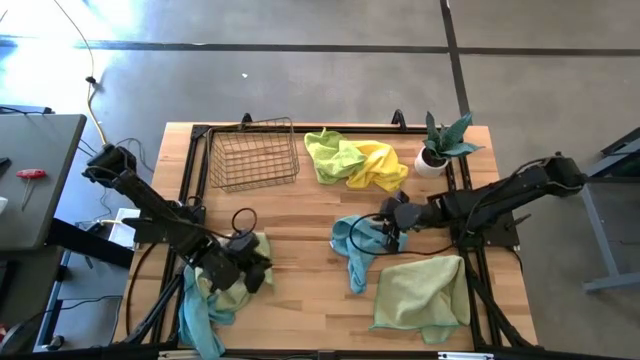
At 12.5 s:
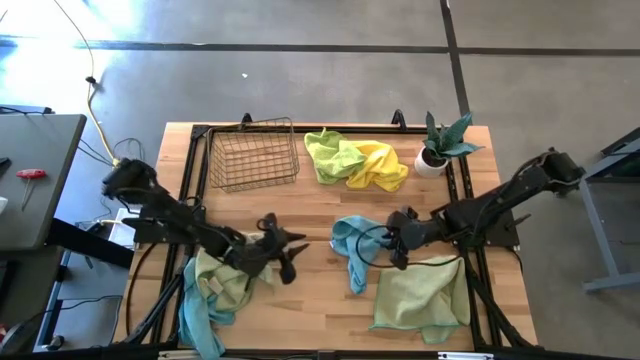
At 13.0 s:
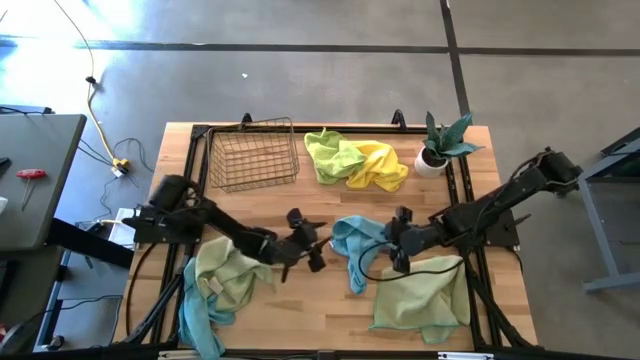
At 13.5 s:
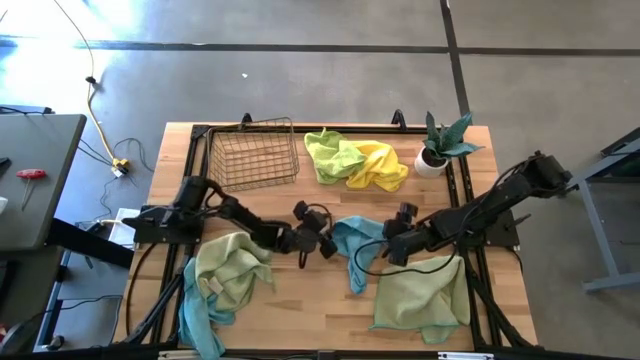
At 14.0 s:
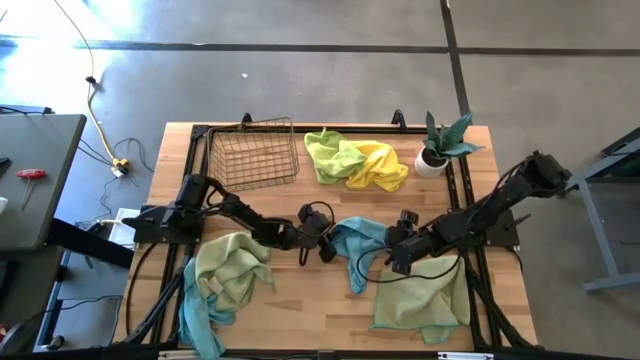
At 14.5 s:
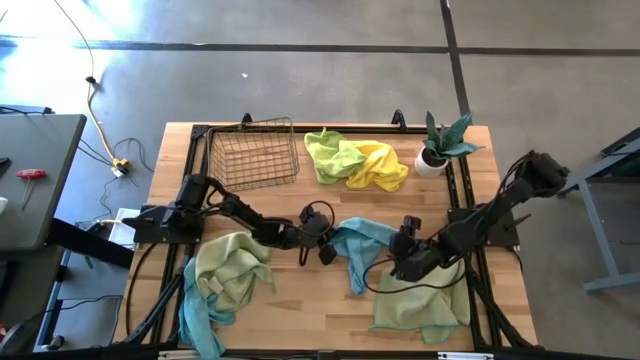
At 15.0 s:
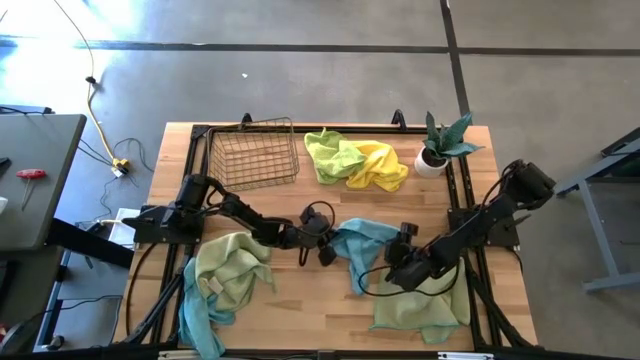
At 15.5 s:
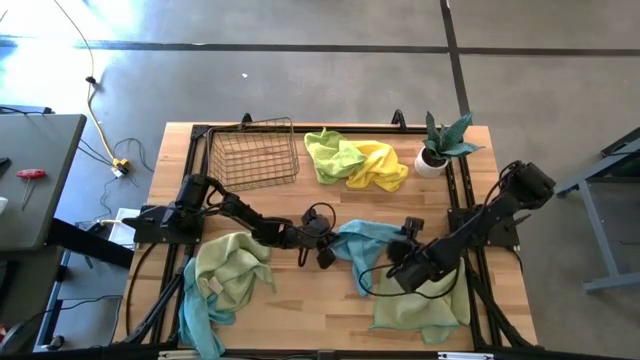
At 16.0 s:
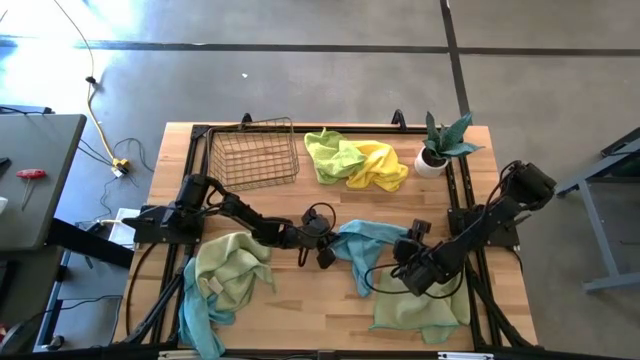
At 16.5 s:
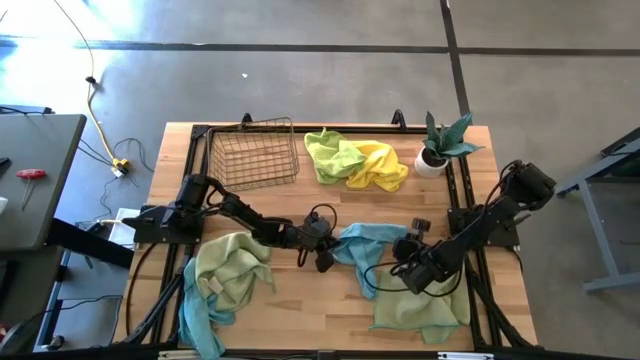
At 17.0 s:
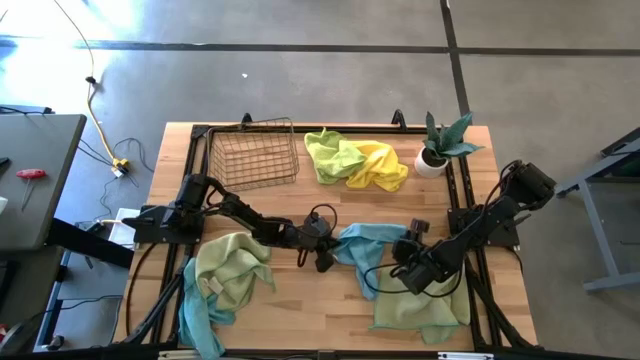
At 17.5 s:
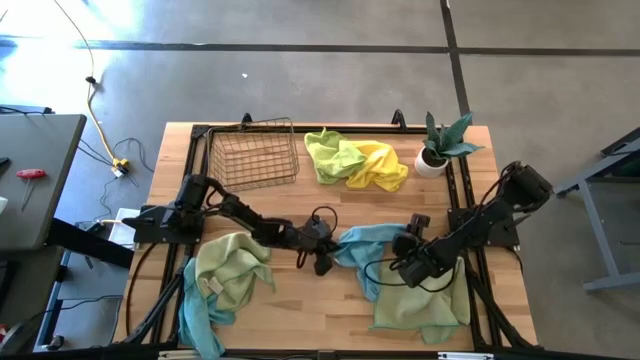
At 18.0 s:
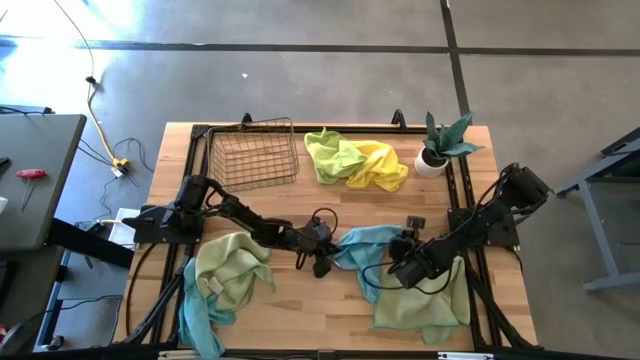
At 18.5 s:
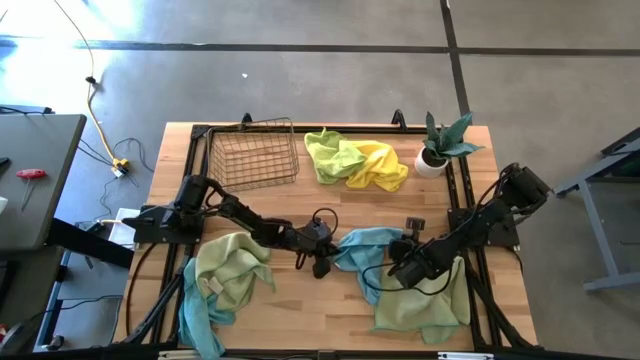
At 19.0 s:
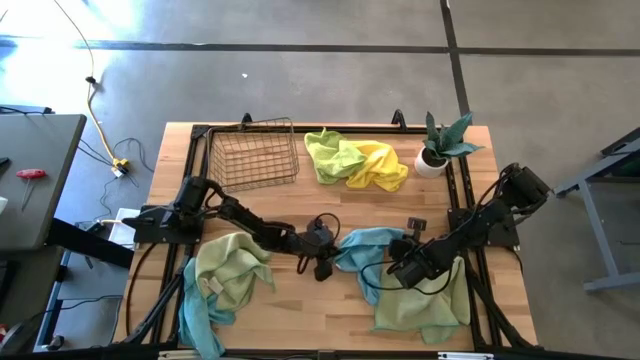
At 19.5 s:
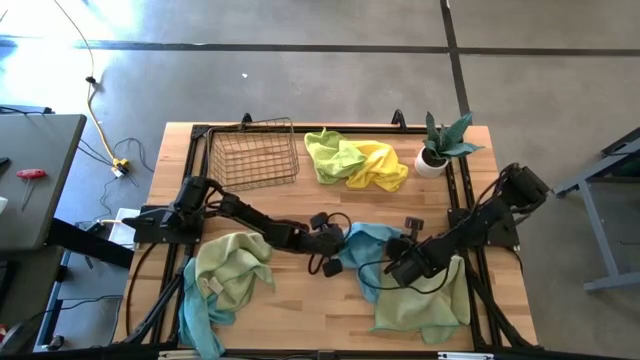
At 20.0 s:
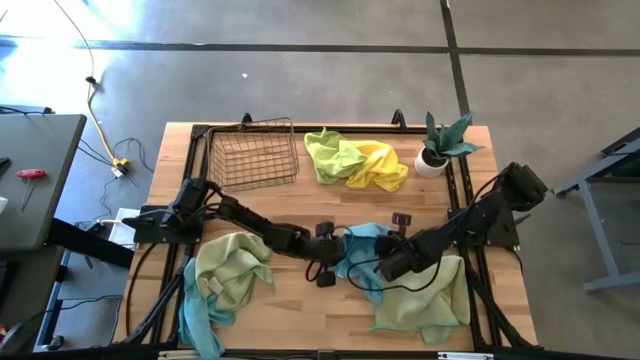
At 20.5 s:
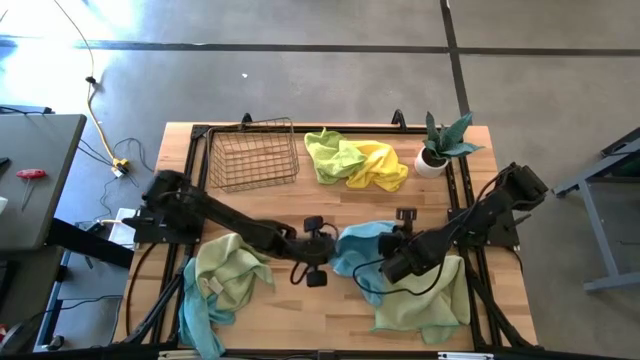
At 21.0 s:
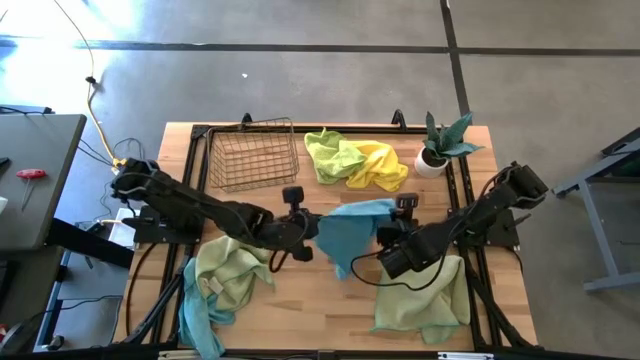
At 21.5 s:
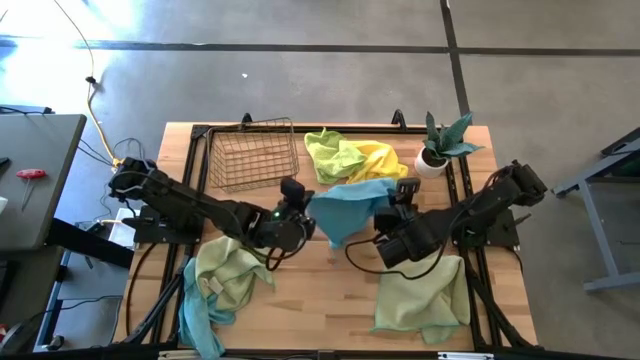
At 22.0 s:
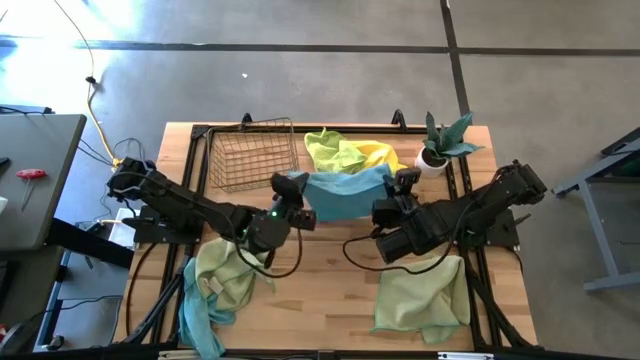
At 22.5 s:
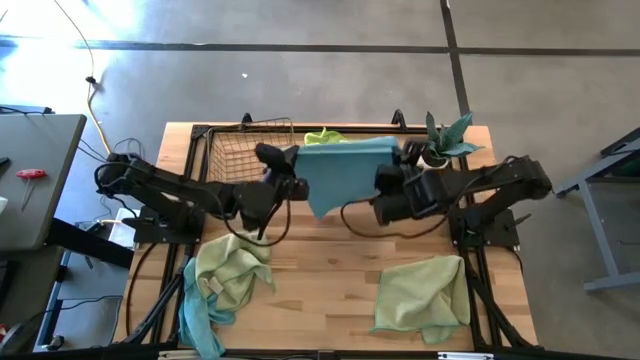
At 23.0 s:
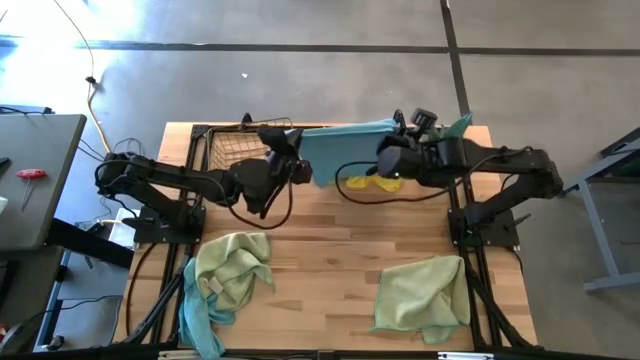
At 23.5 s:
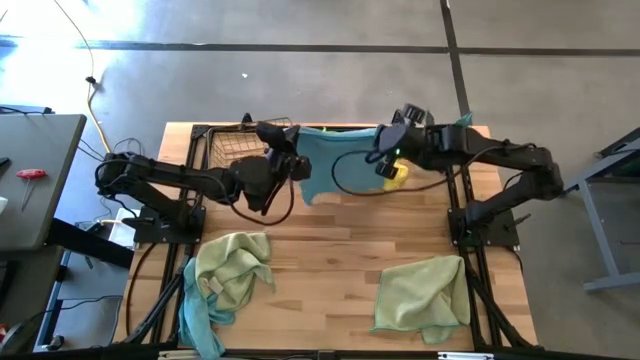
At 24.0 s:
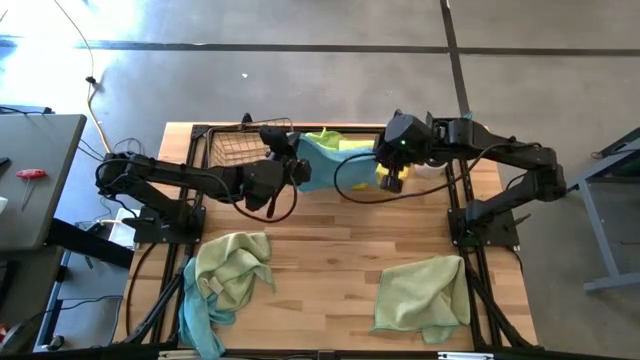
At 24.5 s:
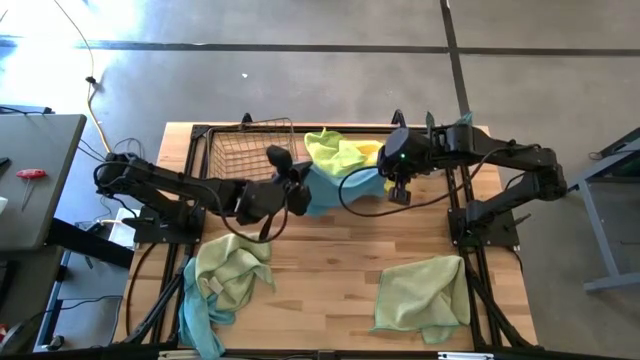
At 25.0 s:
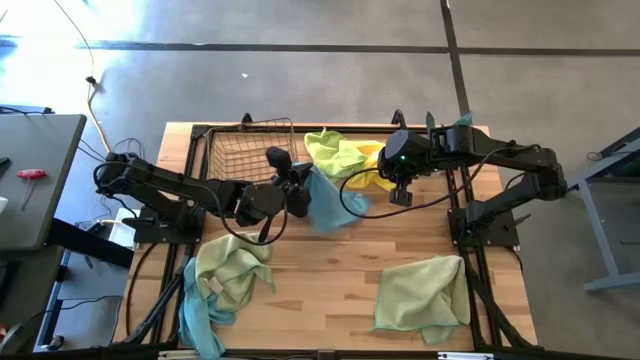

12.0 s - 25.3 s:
Task: Fold microfiber towels
Fold the right blue towel

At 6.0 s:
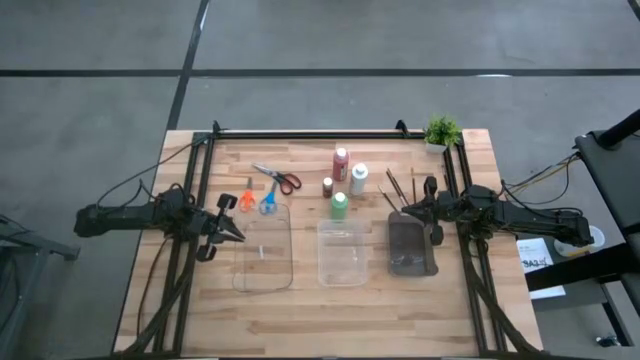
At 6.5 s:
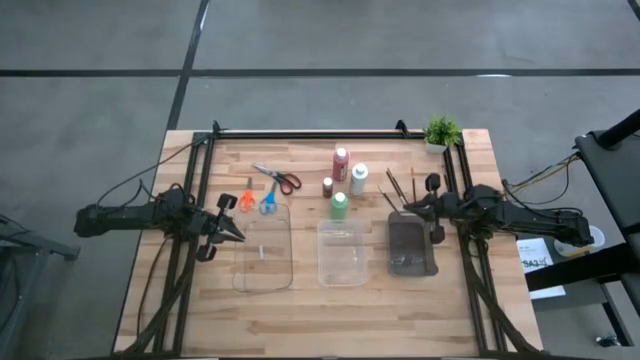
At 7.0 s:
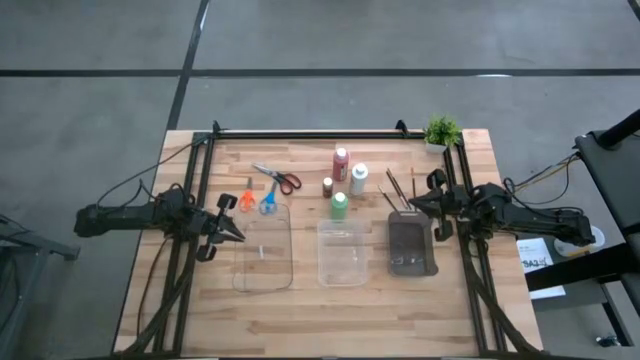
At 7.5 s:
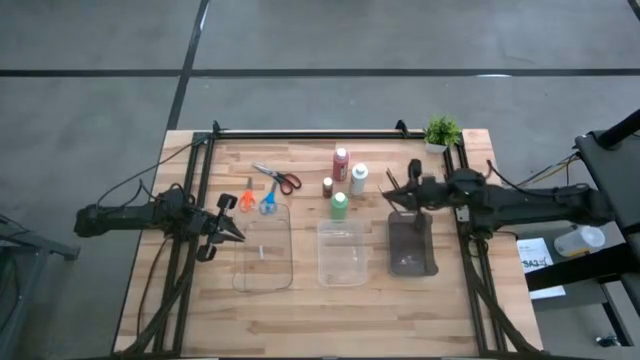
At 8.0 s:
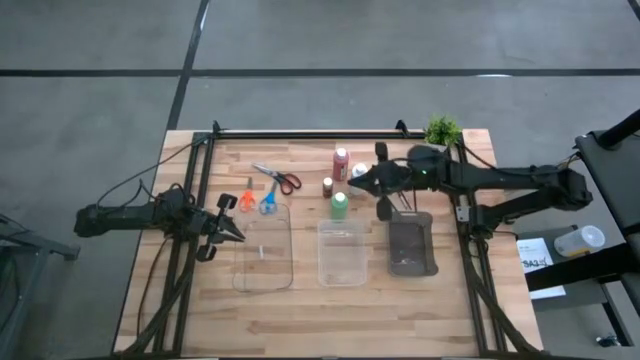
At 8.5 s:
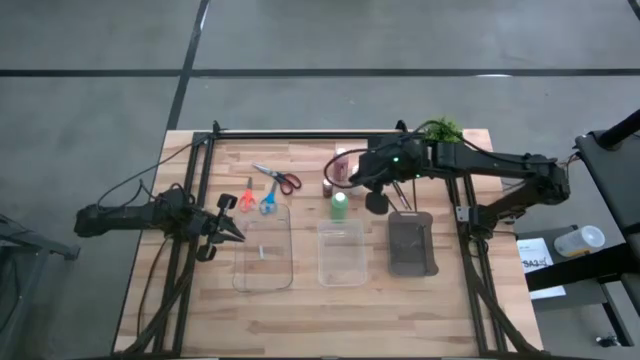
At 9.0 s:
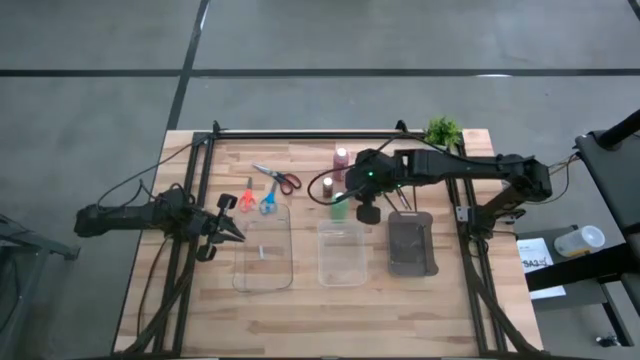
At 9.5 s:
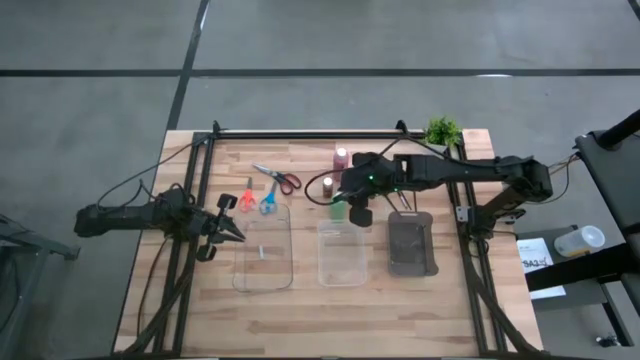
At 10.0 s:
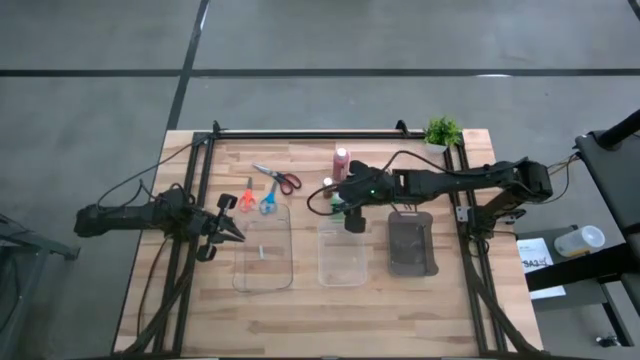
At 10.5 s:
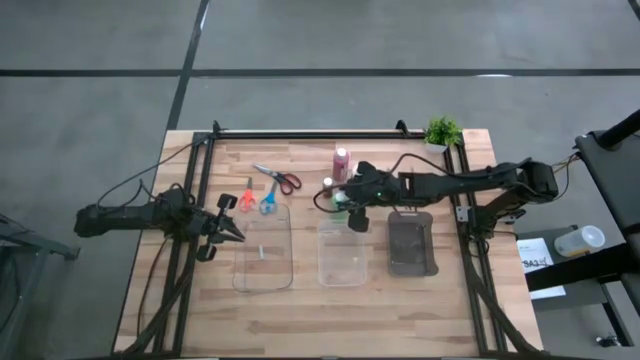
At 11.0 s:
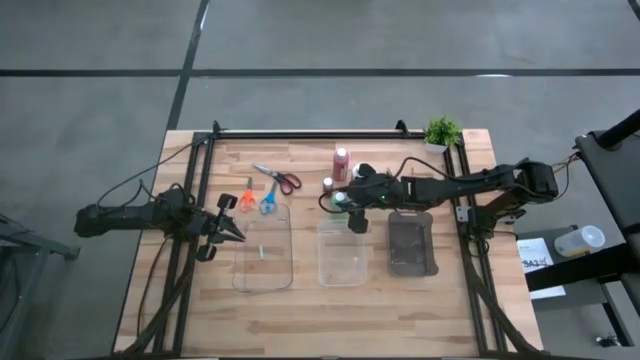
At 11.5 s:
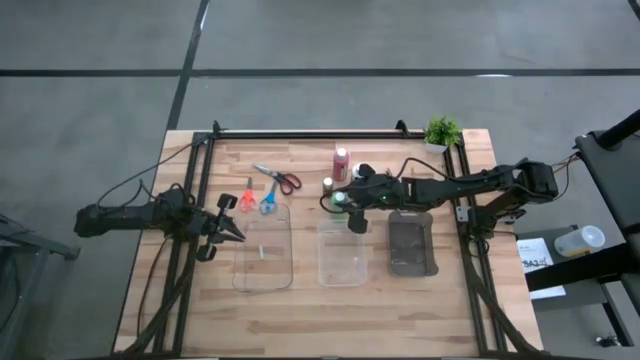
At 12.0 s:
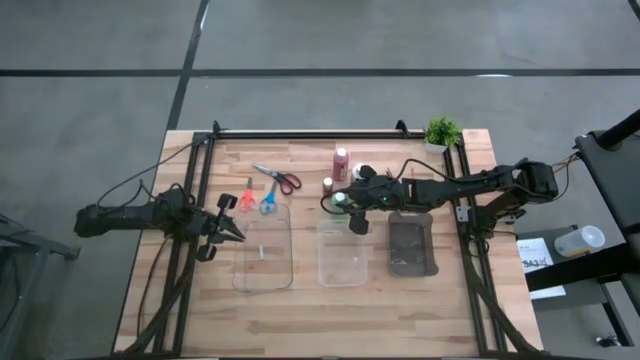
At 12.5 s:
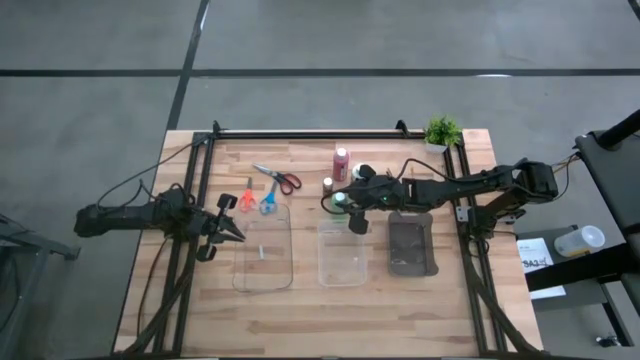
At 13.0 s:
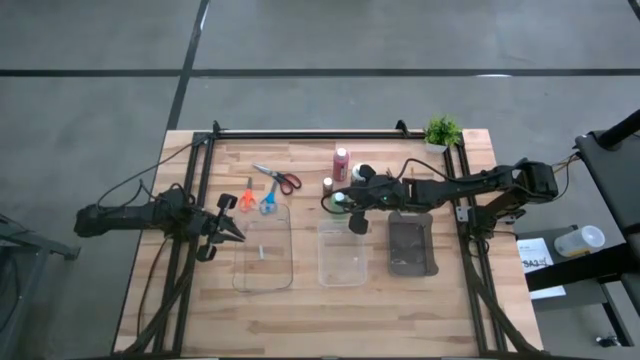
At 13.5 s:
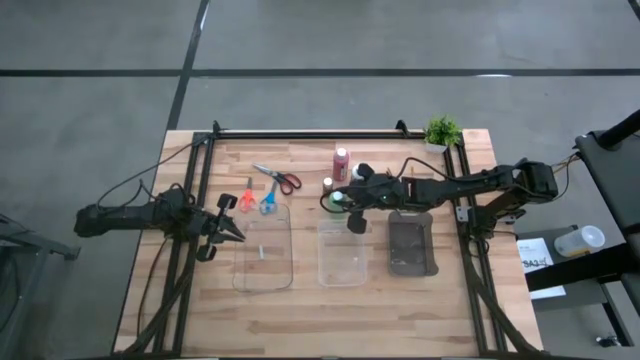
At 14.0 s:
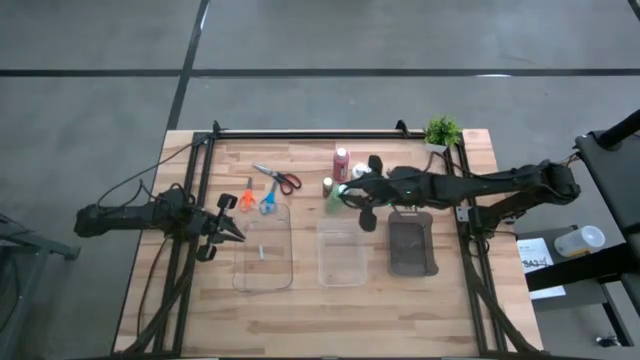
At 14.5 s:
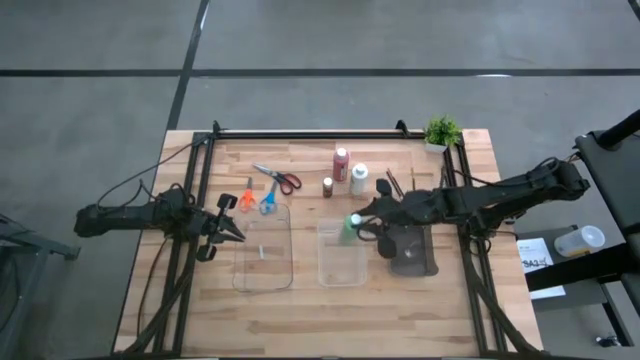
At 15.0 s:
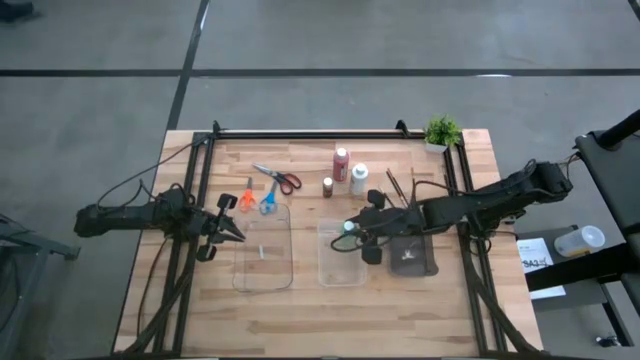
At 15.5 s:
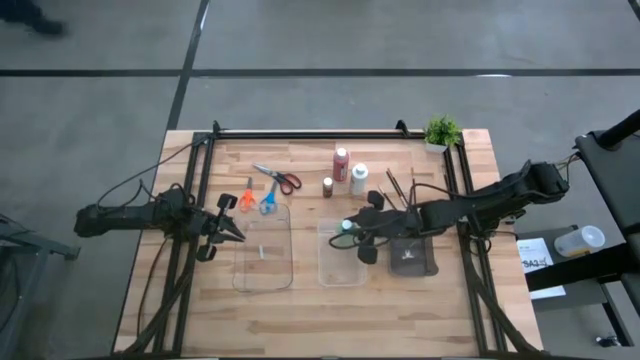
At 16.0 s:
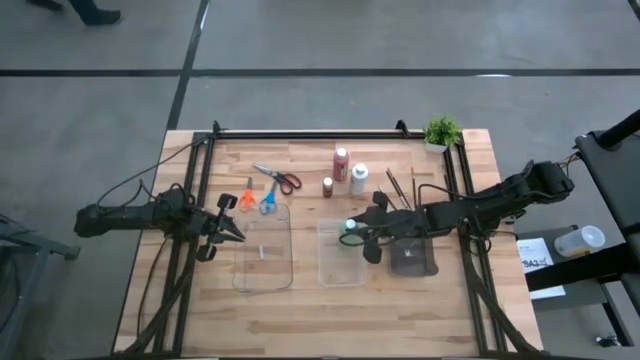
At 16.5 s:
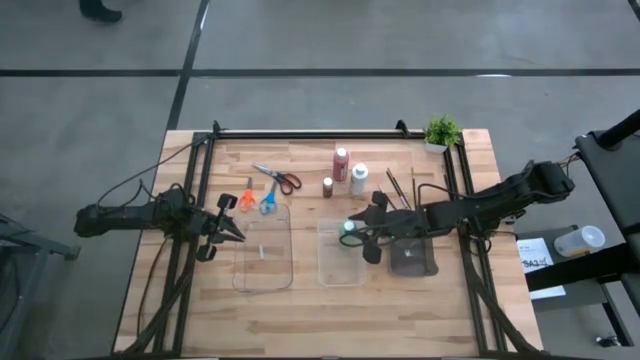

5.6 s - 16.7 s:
Task: Pick & Place Paint Supplies
Put the green bottle into the white transparent bin
